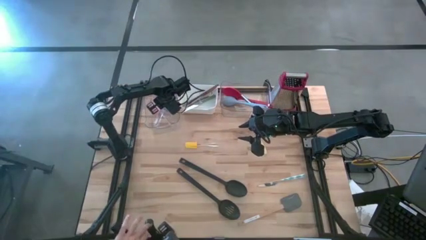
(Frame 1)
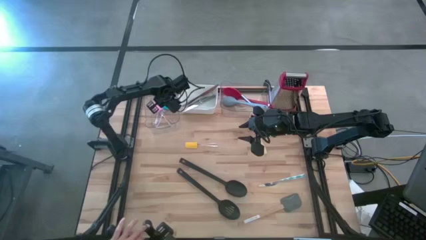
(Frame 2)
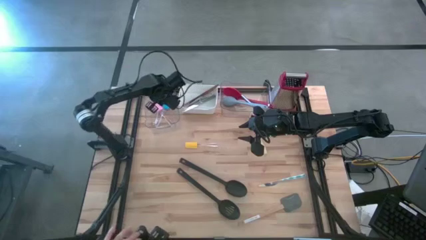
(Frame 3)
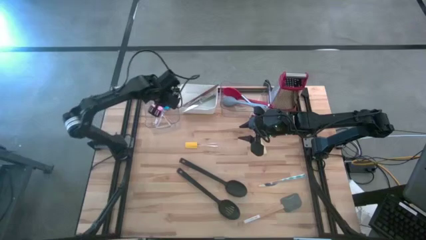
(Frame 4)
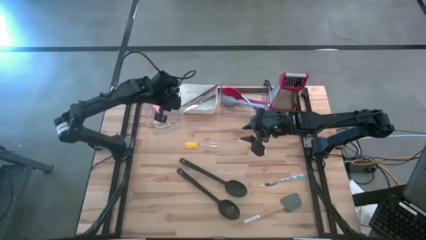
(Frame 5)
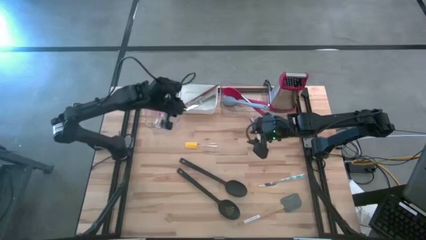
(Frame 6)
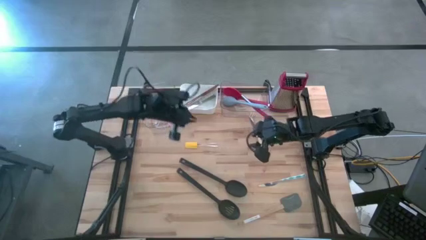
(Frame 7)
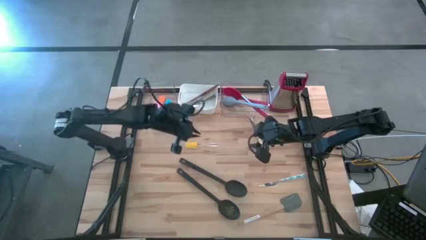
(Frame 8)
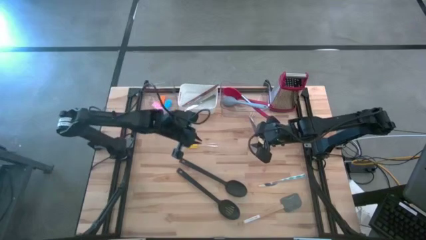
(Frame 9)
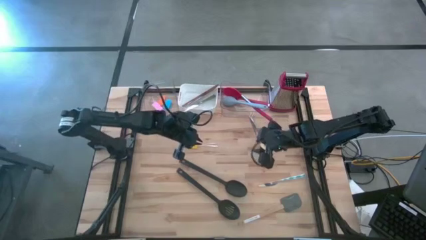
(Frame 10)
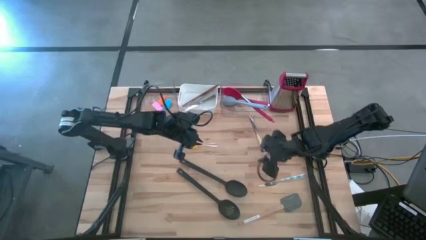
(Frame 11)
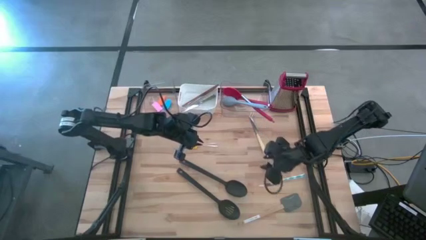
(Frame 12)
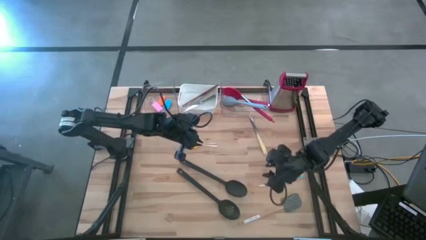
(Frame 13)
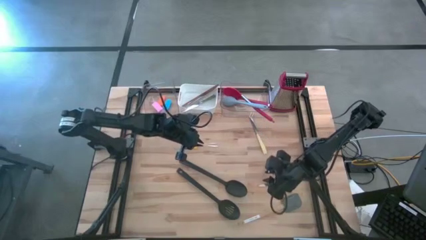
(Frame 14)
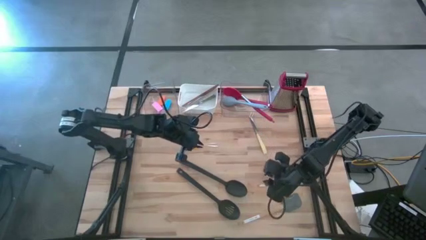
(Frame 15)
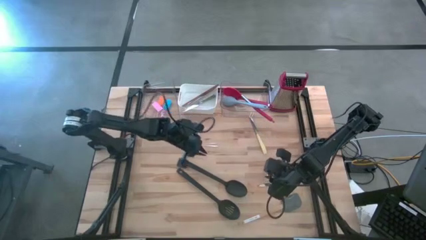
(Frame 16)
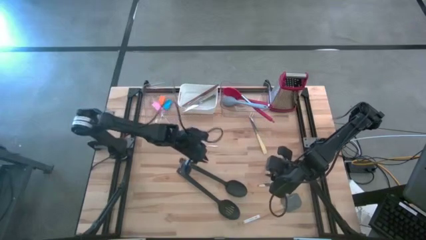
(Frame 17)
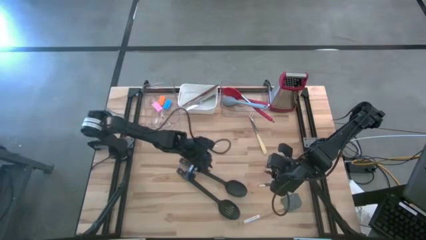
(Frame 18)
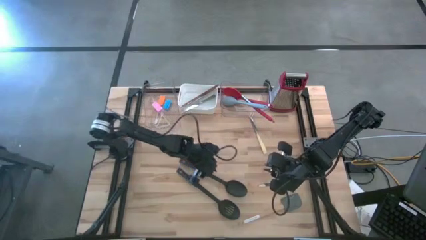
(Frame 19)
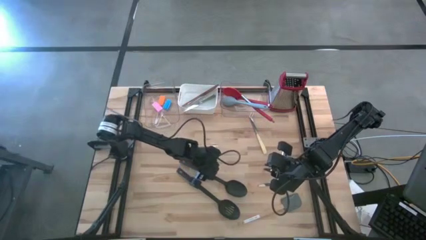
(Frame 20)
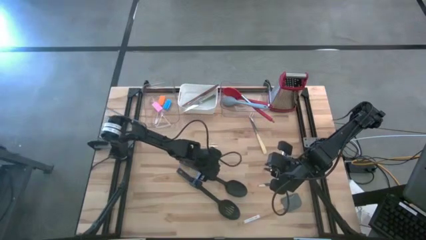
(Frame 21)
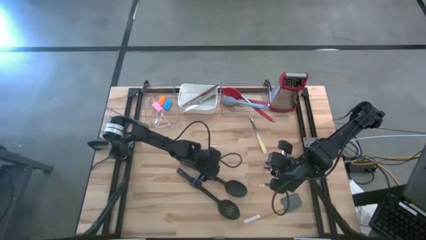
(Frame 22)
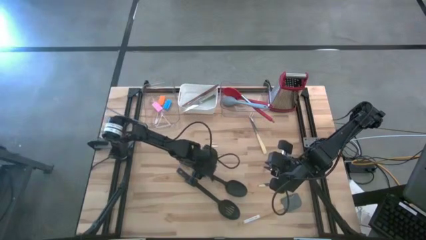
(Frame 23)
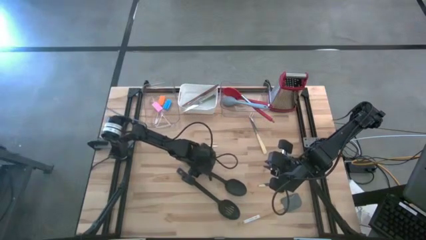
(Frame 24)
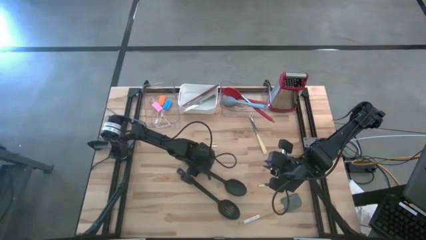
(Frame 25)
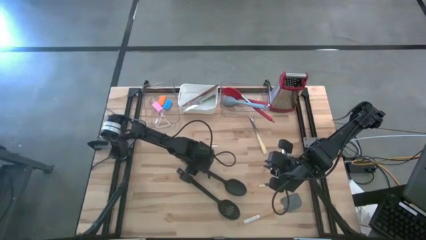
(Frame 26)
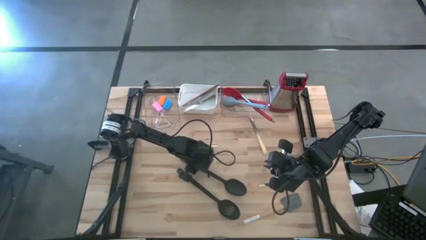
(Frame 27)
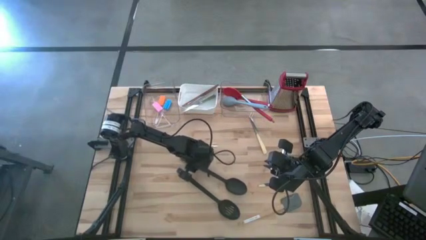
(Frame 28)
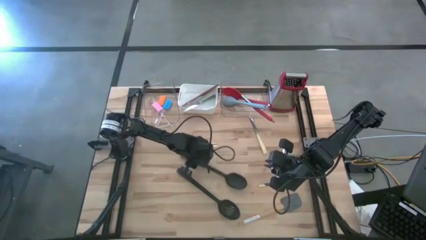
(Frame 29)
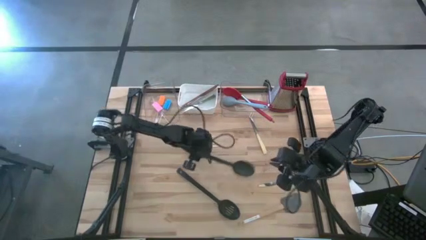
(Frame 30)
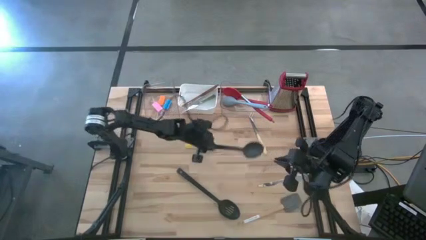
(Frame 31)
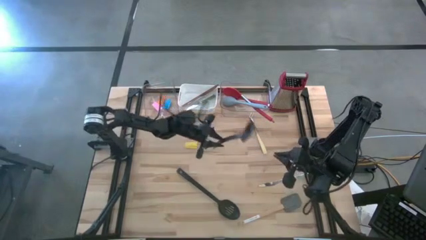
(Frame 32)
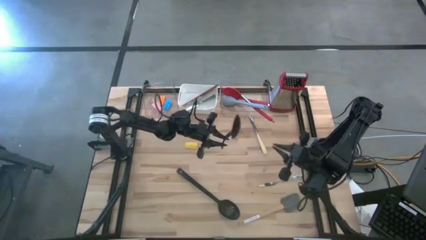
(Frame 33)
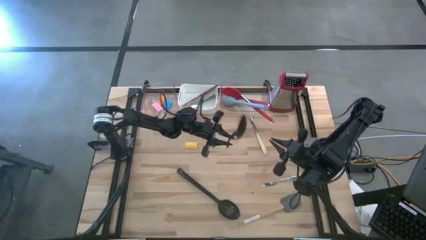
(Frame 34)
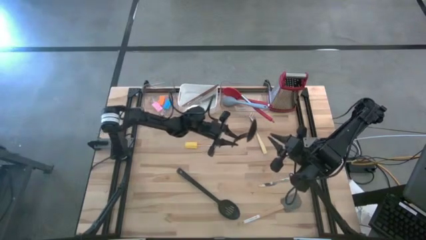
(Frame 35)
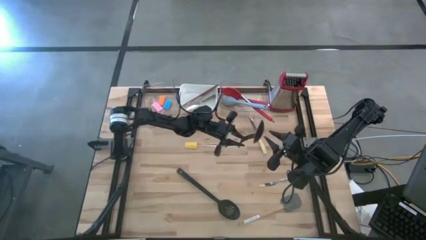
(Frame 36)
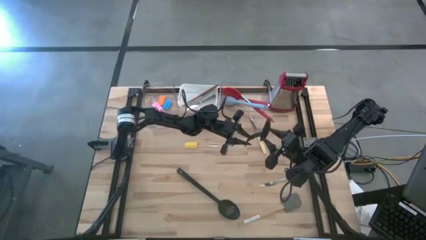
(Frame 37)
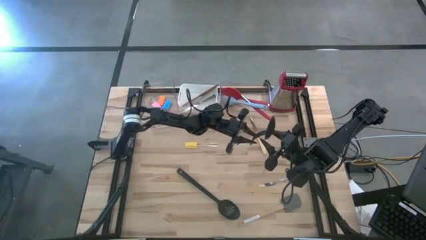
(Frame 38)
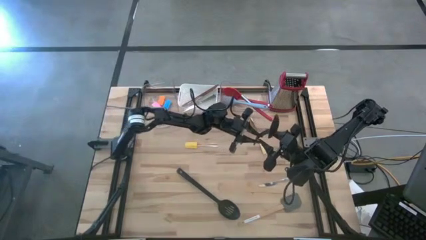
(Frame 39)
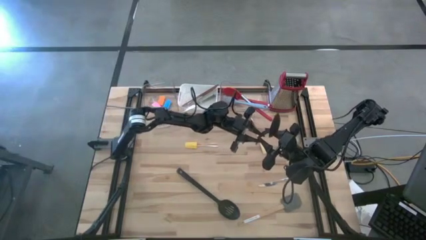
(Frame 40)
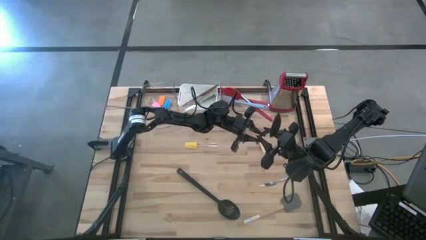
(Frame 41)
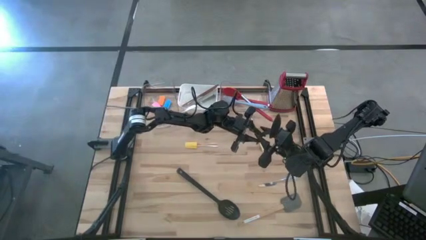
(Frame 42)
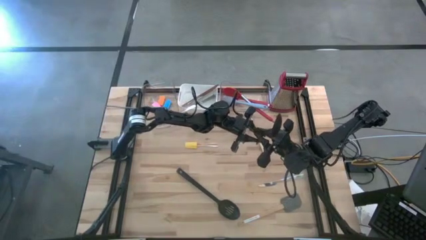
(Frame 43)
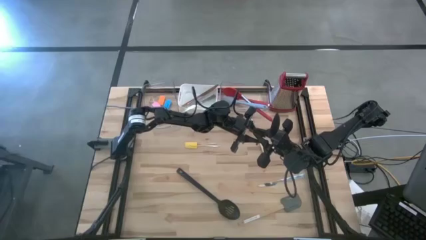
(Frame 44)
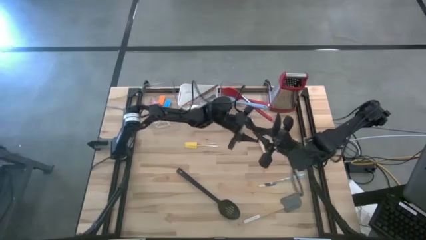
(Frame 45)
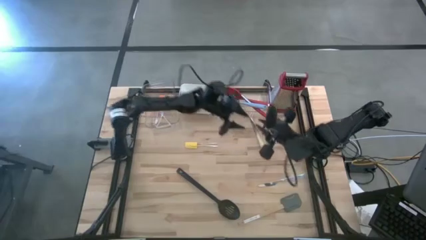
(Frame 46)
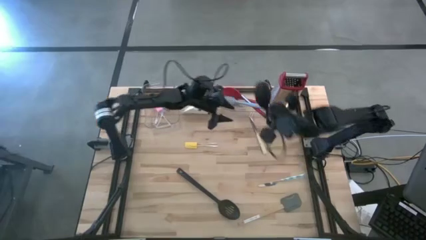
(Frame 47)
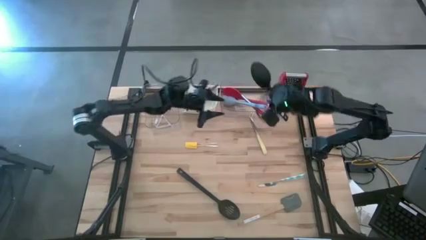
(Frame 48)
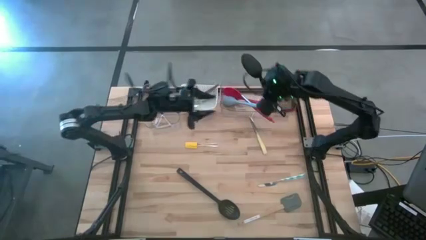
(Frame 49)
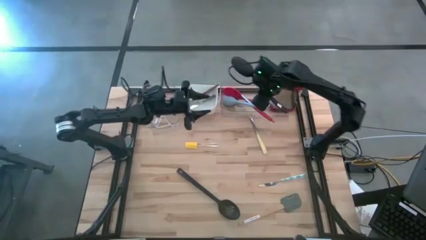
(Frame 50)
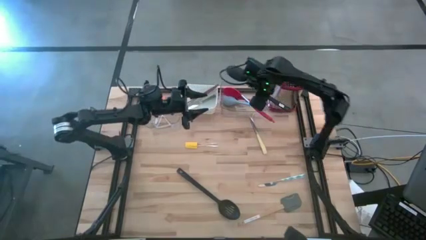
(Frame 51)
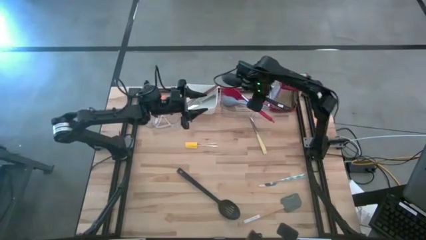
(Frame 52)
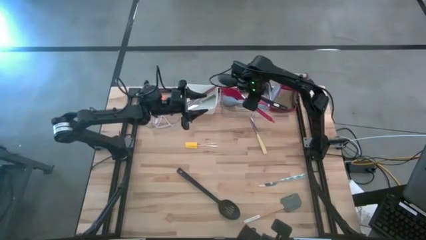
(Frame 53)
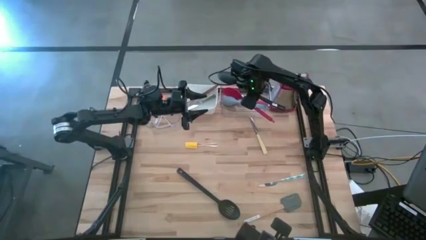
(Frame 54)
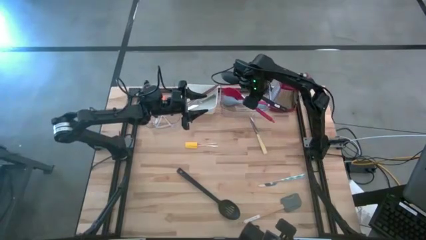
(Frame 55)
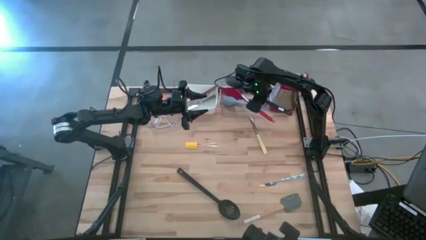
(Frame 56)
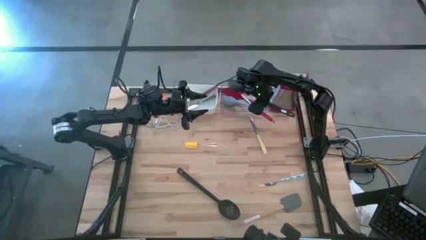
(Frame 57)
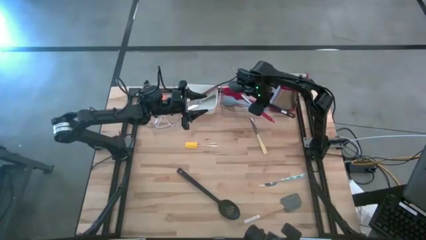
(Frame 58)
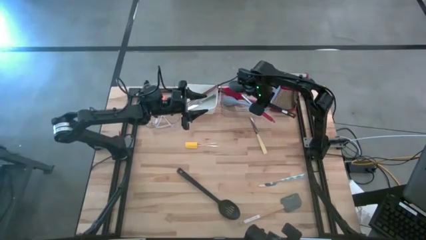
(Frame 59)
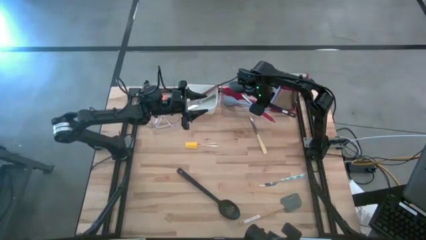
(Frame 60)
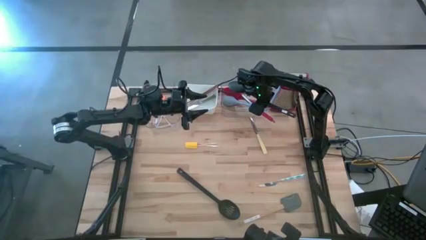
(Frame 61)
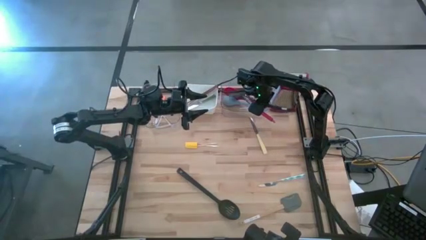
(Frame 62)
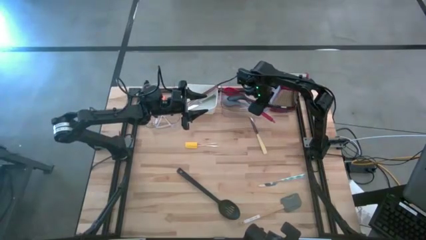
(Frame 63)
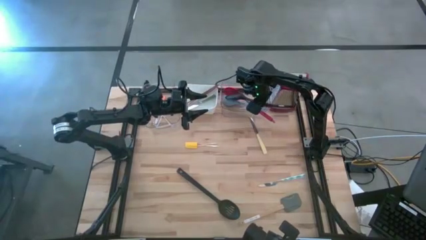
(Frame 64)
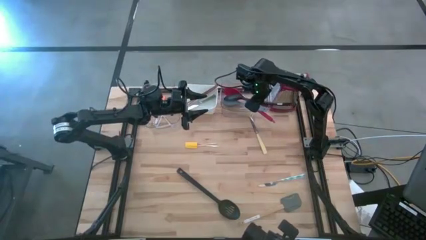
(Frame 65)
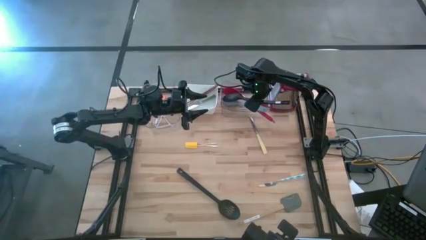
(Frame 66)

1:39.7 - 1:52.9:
Task: Pick & Place Kitchen Items
Put the black serving spoon into the right transparent bin

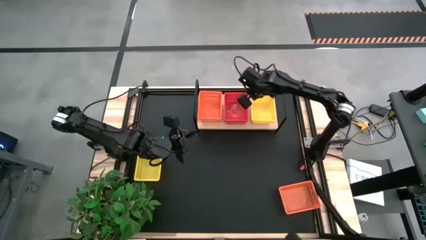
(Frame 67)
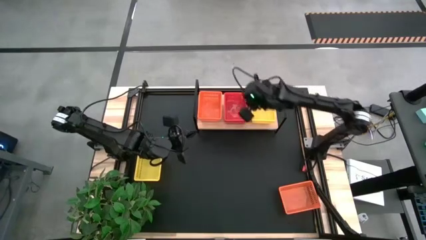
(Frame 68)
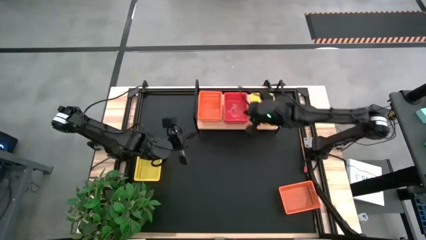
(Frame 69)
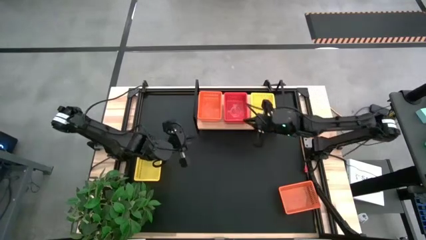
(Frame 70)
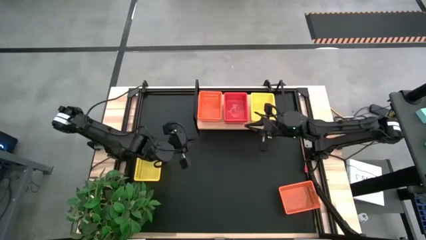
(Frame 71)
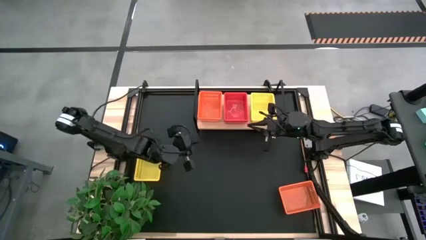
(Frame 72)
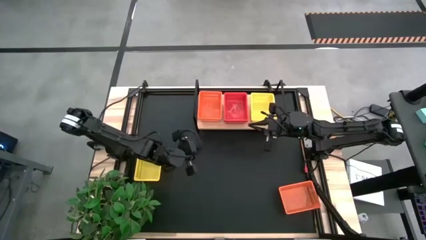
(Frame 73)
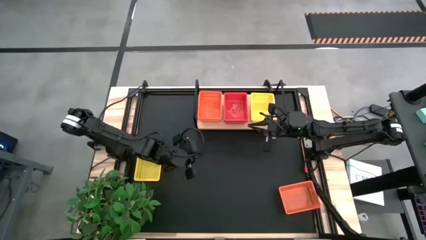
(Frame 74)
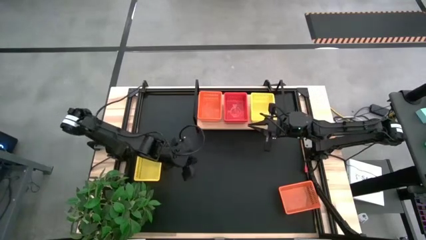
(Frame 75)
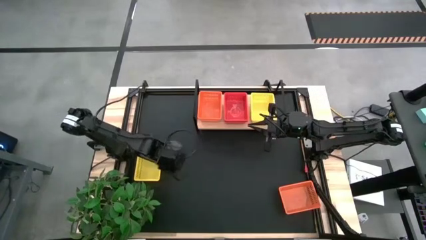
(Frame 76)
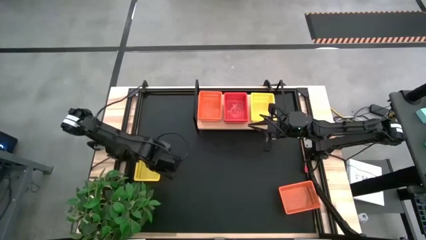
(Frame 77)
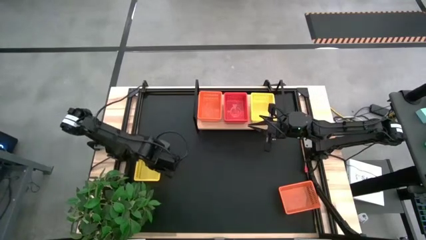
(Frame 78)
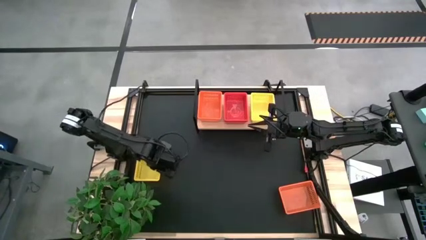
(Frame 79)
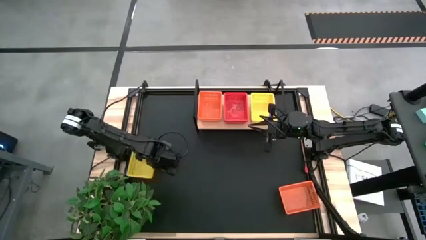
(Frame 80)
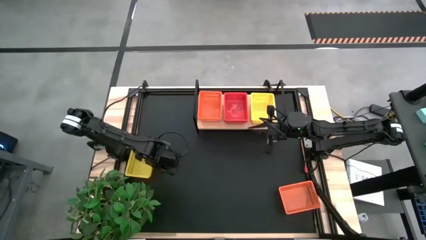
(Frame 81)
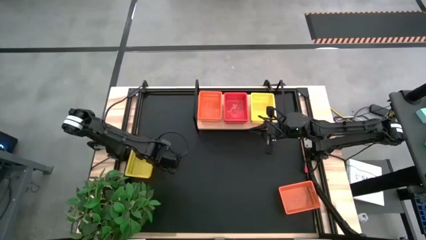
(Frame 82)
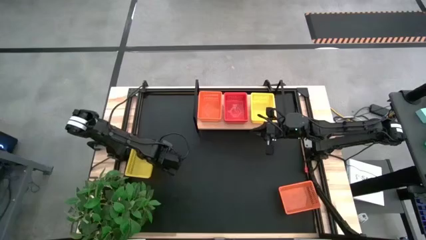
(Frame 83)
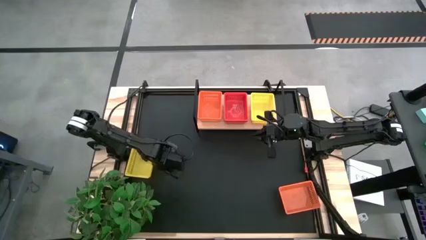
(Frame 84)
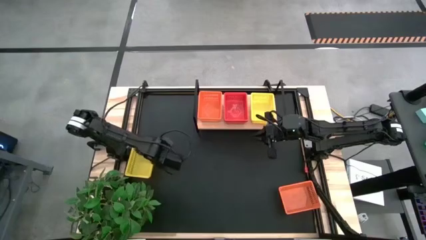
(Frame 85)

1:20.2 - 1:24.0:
Task: Stack baskets on shelf by color
Stack the yellow basket on top of the yellow basket on the shelf
